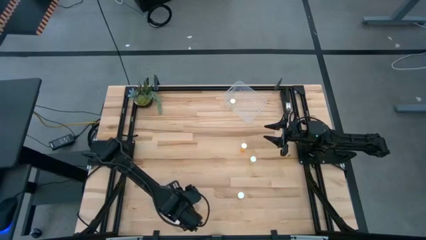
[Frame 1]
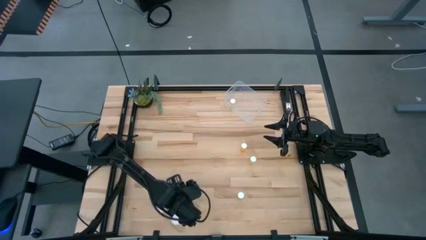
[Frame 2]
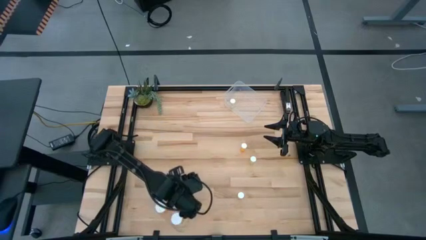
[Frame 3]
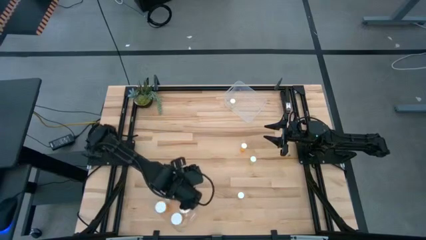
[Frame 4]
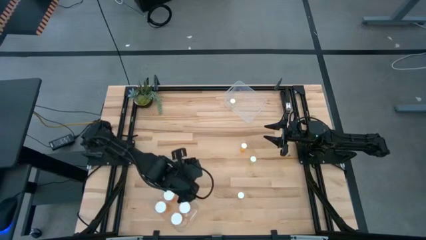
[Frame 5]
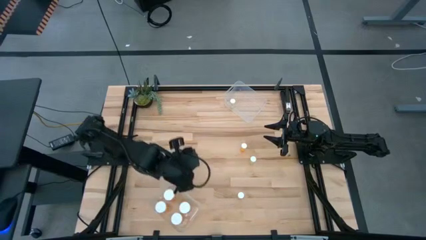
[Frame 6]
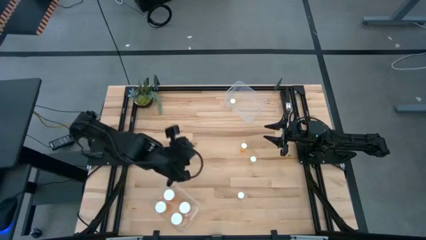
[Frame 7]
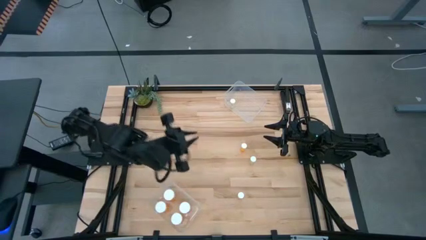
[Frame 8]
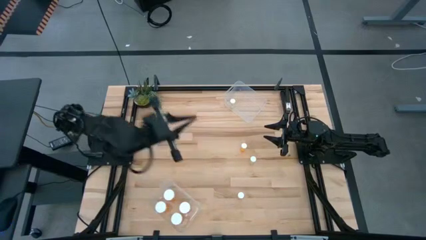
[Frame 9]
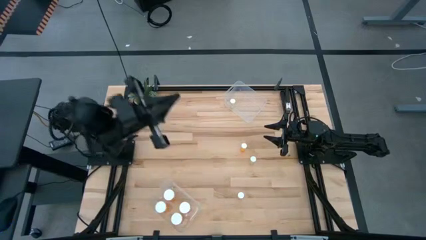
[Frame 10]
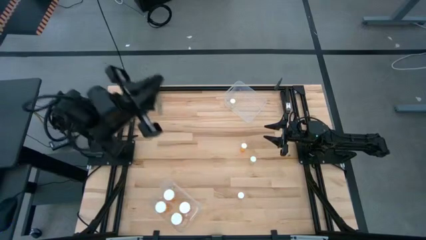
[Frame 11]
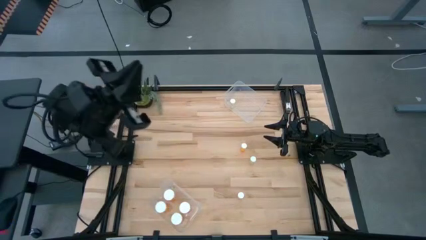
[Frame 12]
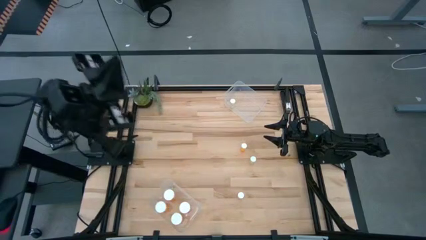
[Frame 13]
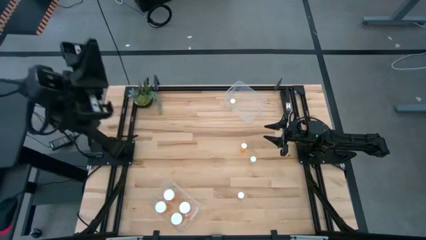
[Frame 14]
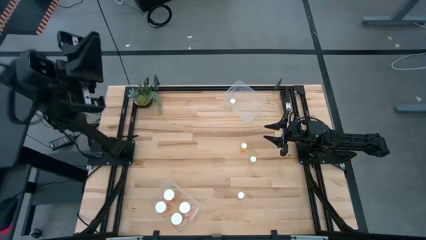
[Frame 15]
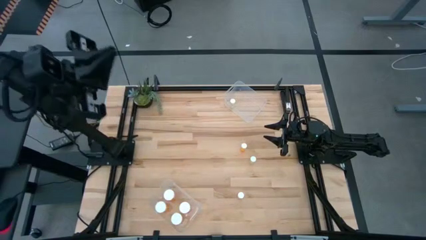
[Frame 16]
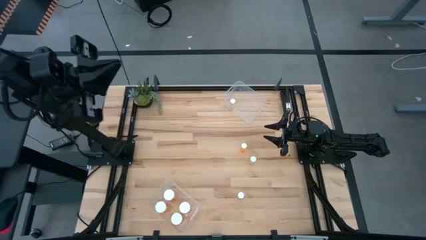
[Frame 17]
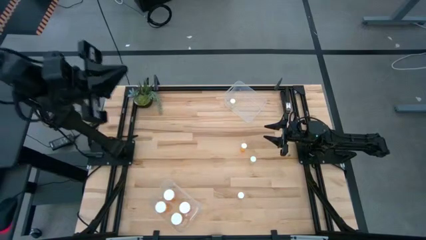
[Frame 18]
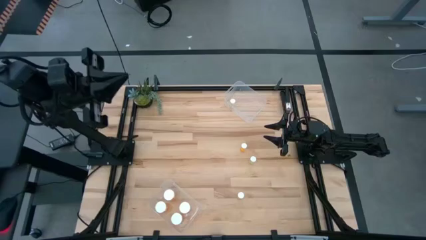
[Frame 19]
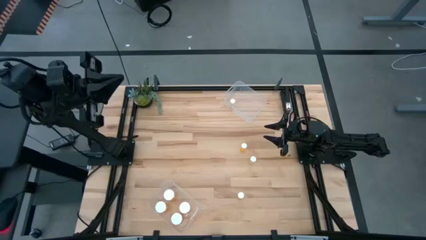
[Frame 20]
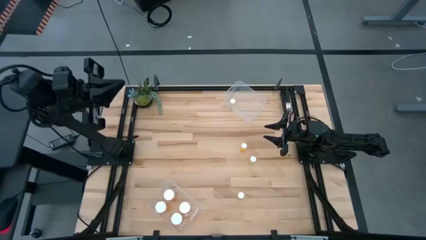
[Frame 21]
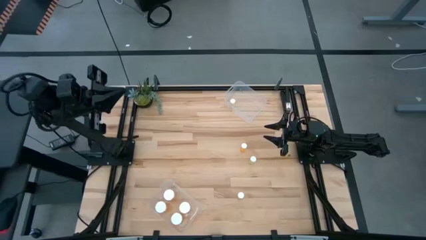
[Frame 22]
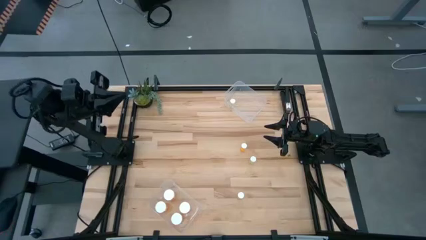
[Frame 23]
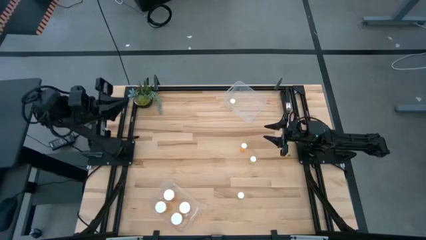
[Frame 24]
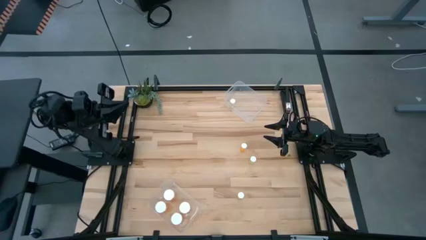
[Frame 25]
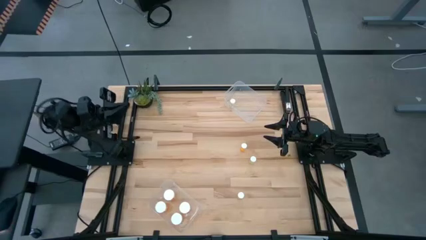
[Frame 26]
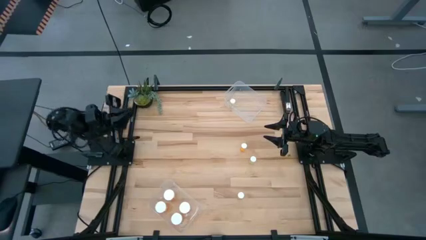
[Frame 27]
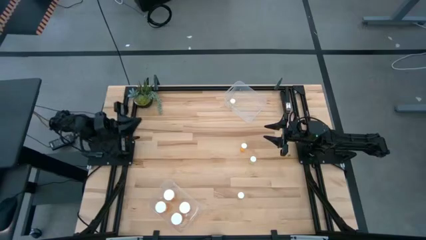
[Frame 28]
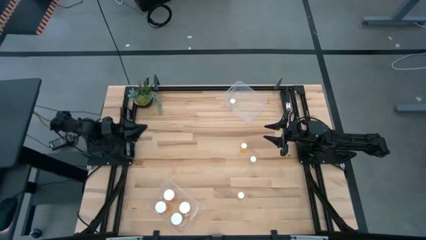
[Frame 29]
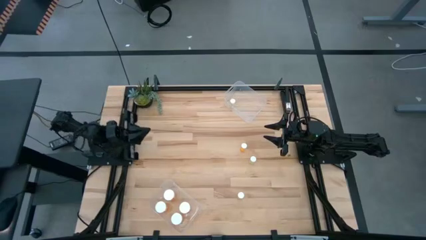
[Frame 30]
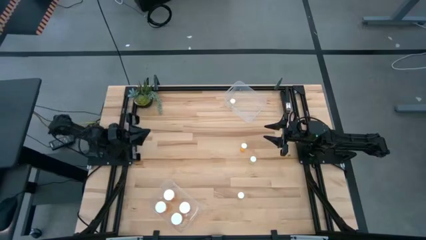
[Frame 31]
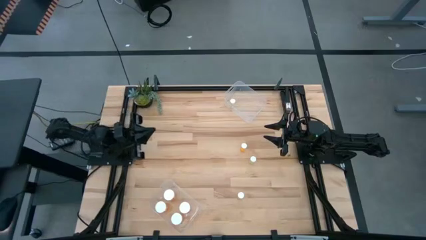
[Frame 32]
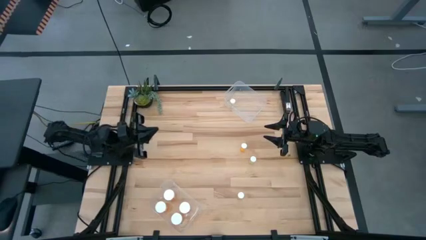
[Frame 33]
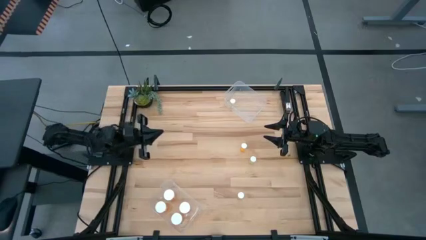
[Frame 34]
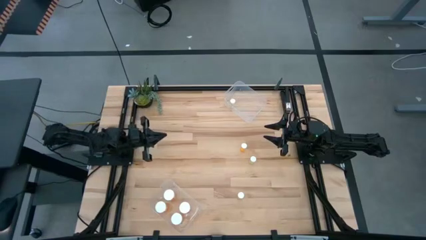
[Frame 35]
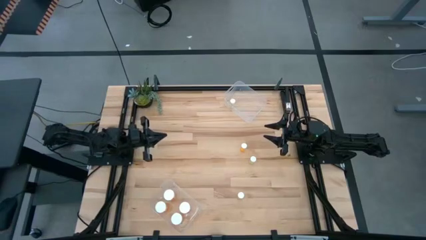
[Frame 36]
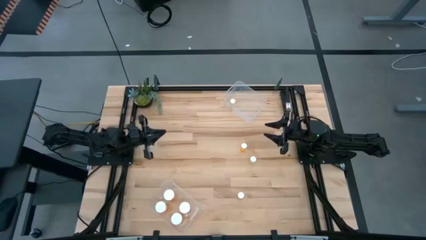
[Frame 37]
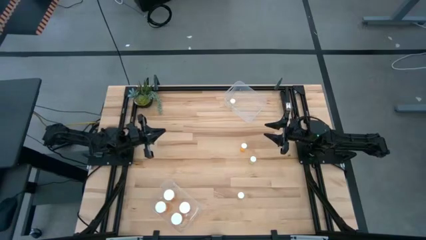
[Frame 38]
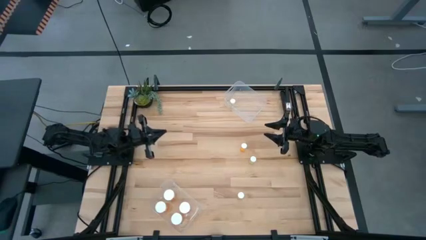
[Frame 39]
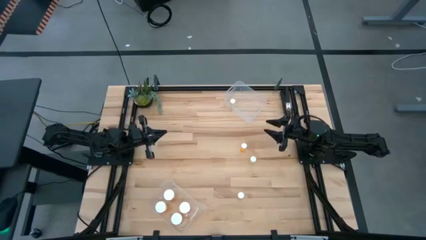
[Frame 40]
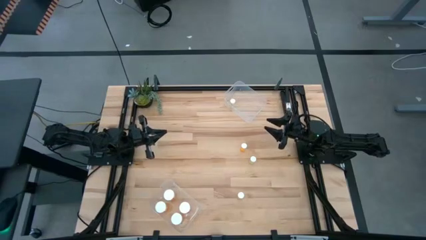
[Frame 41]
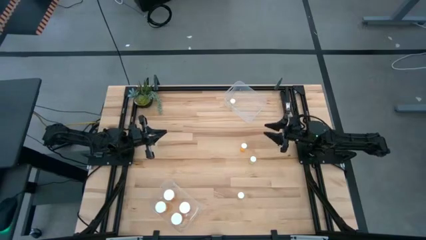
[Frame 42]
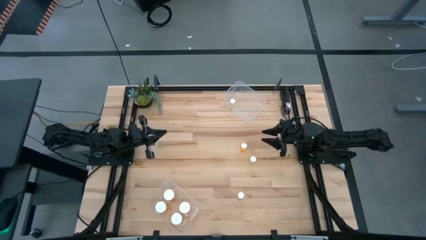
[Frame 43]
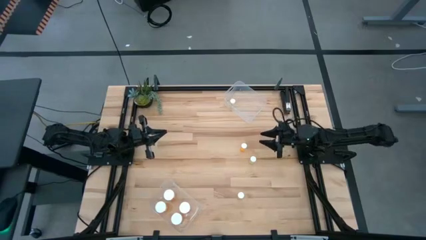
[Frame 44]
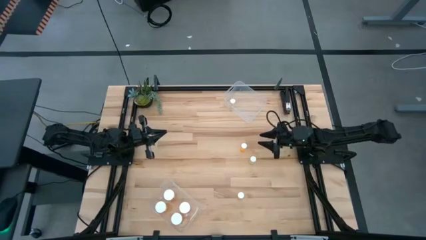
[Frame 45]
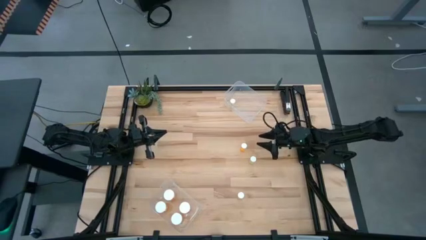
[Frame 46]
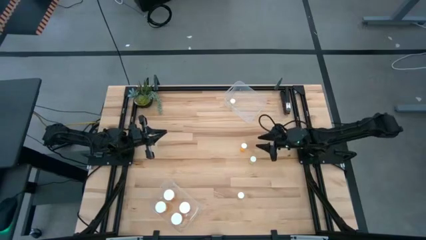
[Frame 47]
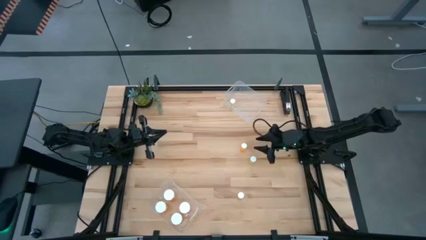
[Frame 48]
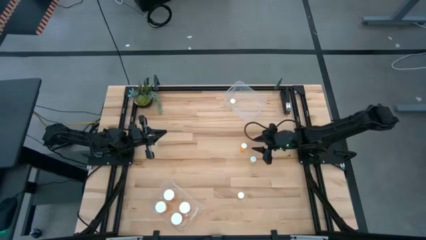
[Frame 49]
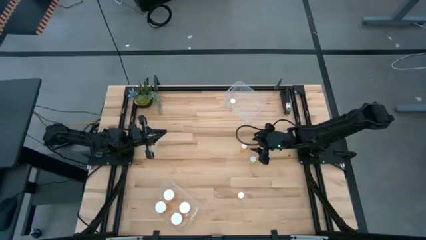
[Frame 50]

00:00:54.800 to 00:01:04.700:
Task: Pick and place medicine bottles into bin by pill shape (circle, oval)
Put the orange tablet bottle into the top transparent bin

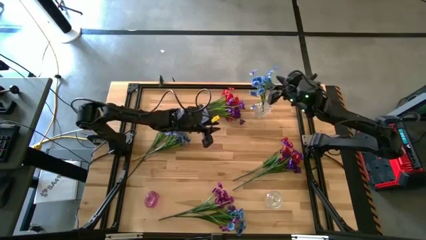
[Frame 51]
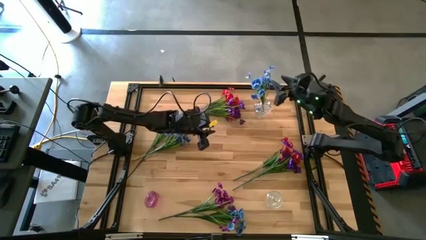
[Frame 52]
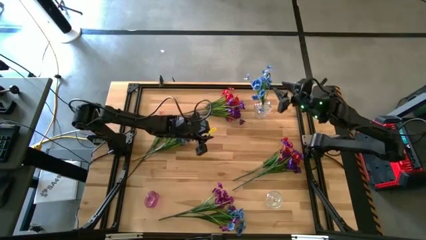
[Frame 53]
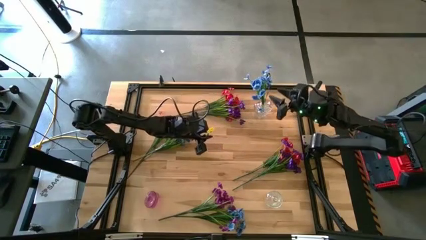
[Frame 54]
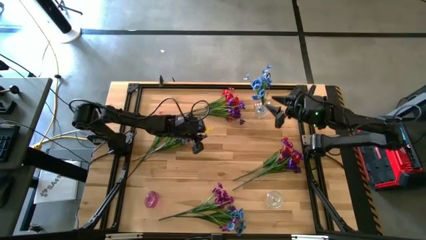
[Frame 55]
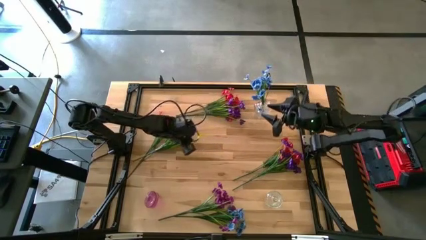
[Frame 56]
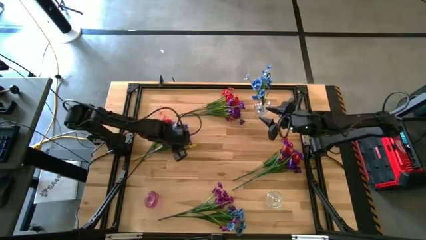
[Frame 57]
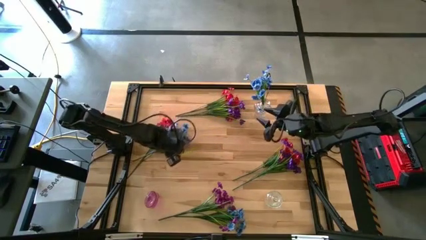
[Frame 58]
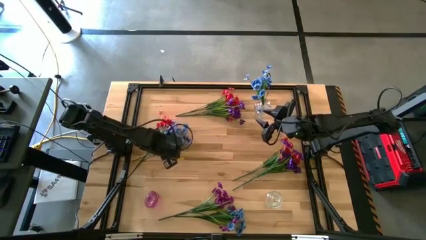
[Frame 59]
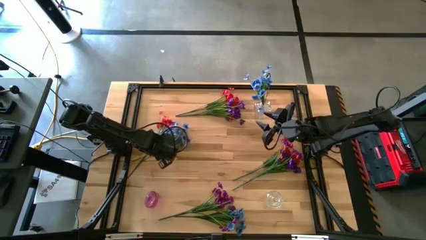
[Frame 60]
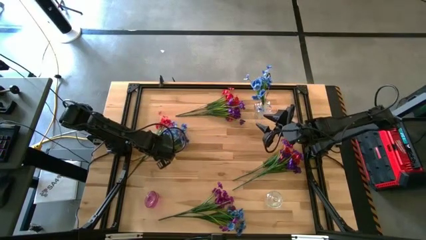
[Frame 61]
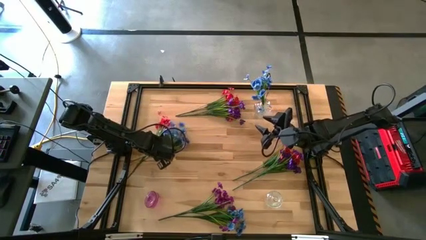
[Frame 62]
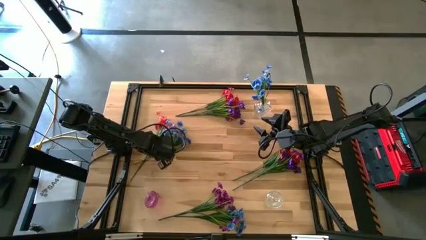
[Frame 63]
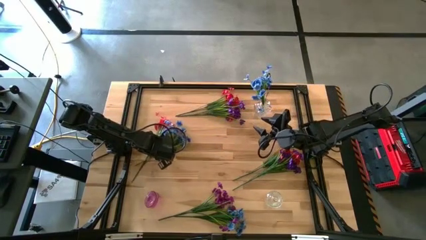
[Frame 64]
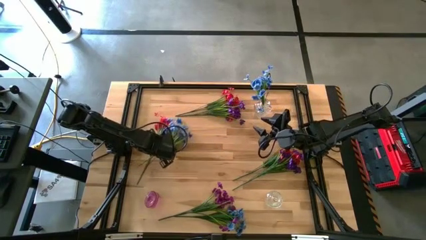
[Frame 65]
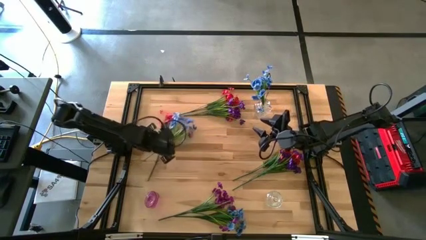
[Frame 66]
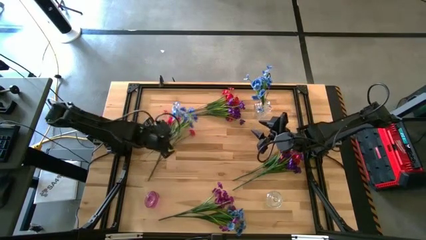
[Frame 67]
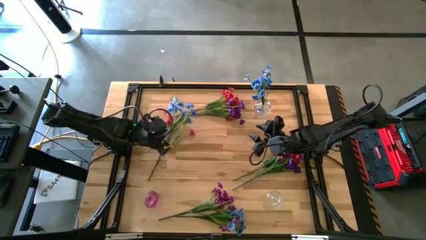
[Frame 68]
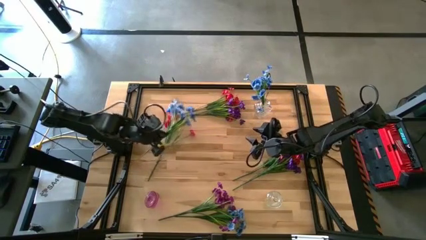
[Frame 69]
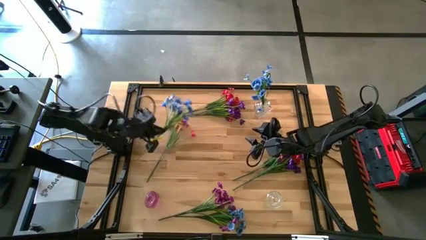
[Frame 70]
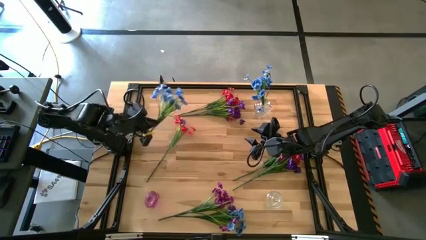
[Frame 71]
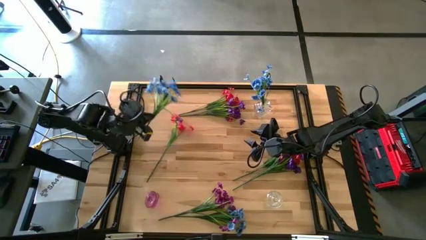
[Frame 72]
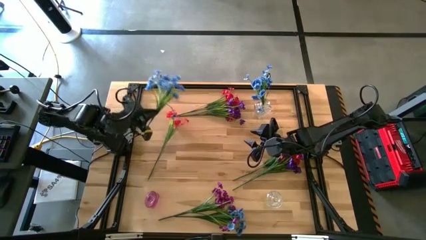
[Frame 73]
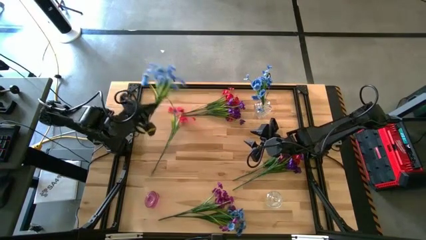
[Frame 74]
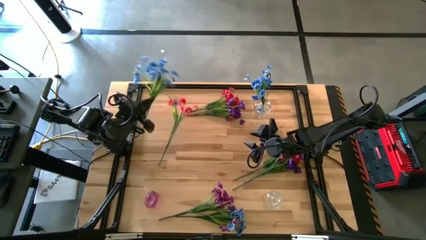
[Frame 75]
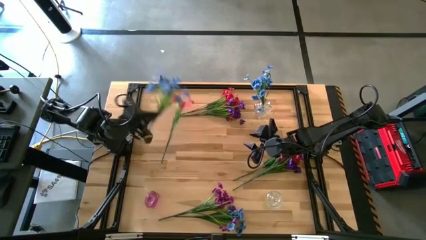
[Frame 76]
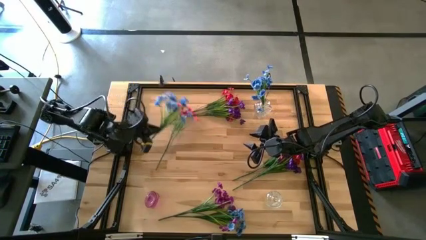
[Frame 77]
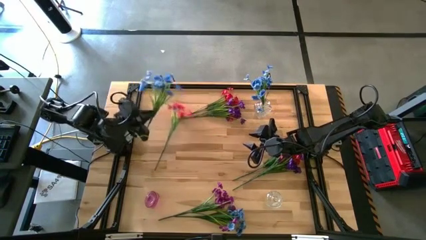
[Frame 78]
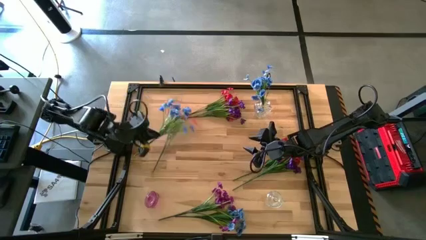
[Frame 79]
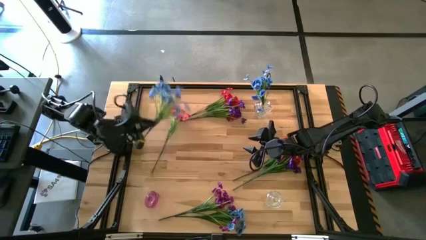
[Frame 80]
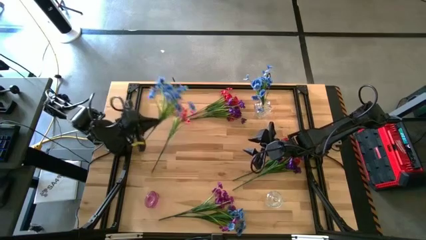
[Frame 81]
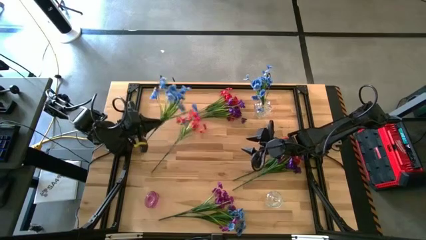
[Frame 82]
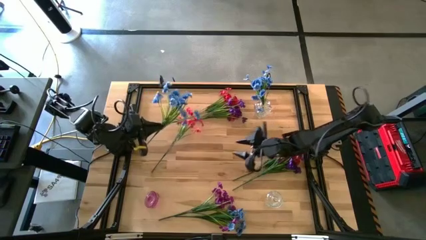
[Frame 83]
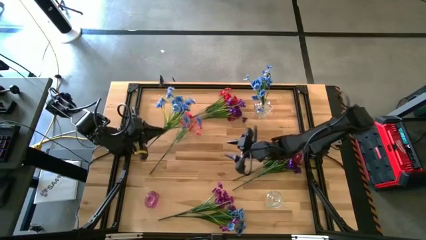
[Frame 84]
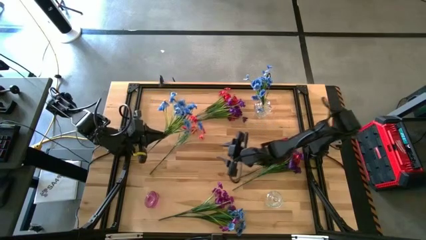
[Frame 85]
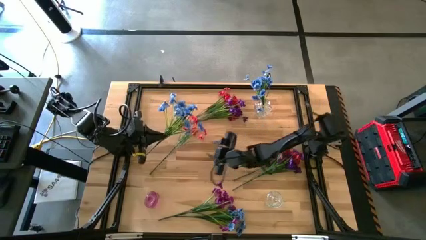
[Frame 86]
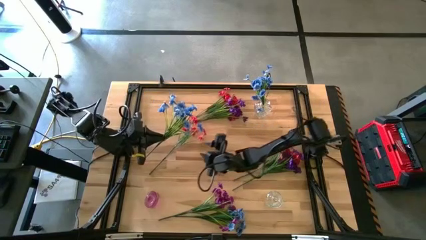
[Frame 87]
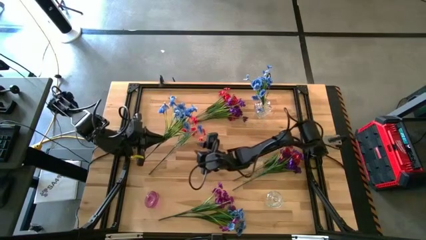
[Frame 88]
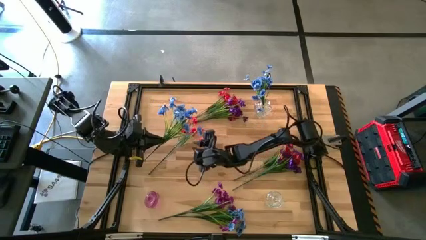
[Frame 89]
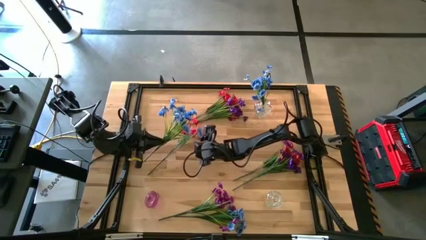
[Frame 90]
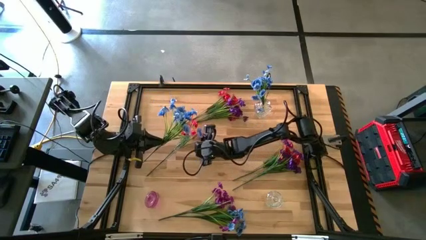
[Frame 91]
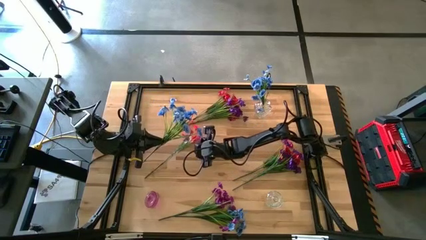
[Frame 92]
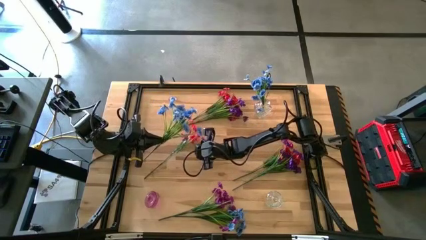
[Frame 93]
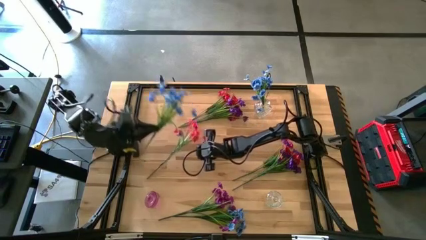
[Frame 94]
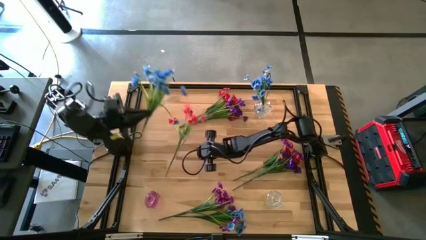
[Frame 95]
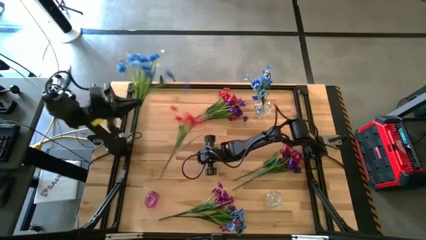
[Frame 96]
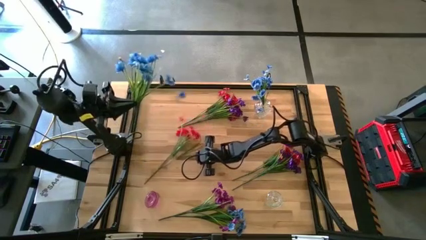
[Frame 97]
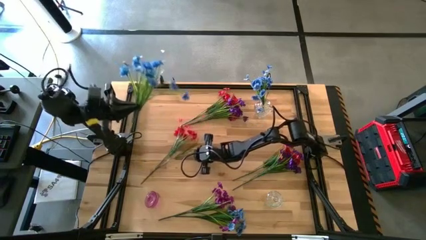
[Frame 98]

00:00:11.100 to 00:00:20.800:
Task: Sort flowers into vase by color
Put the top blue flower into the top transparent flower vase
